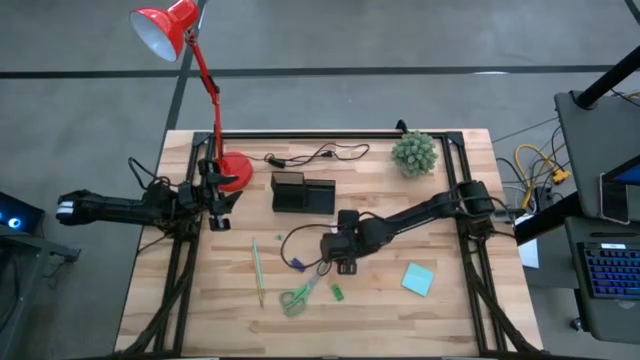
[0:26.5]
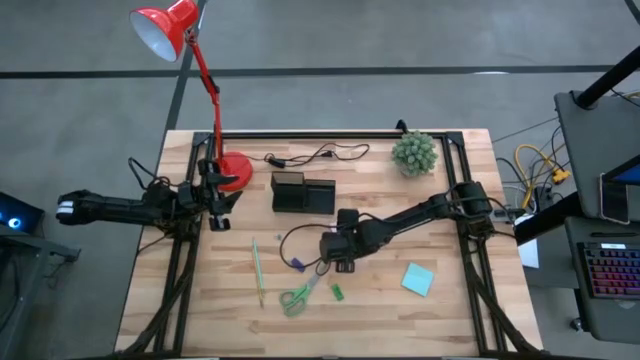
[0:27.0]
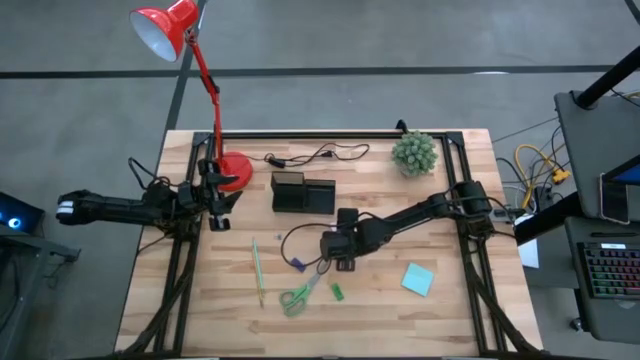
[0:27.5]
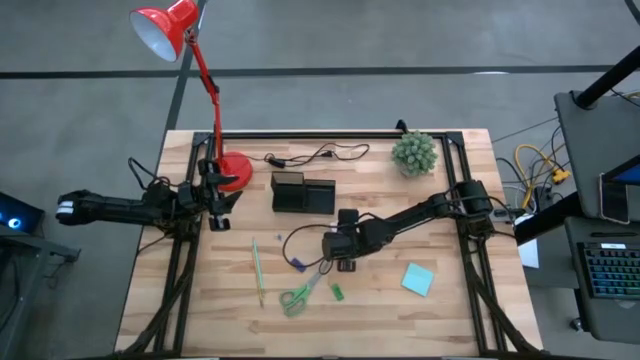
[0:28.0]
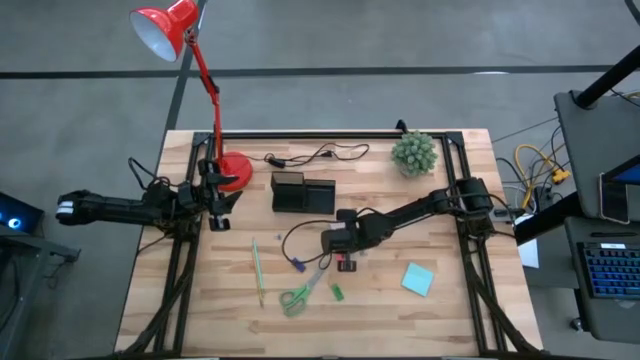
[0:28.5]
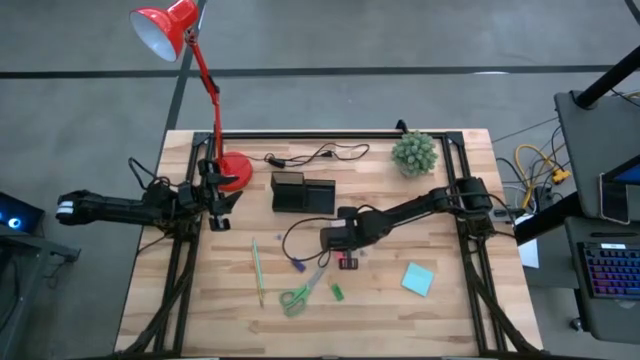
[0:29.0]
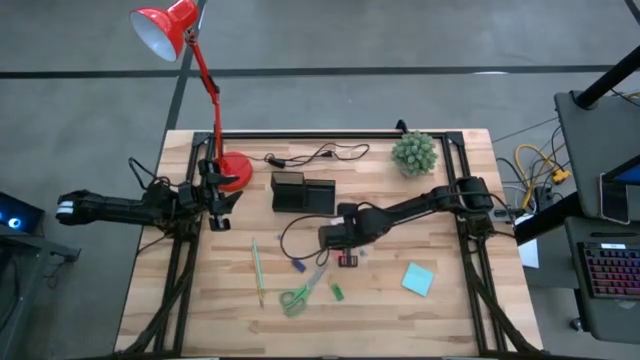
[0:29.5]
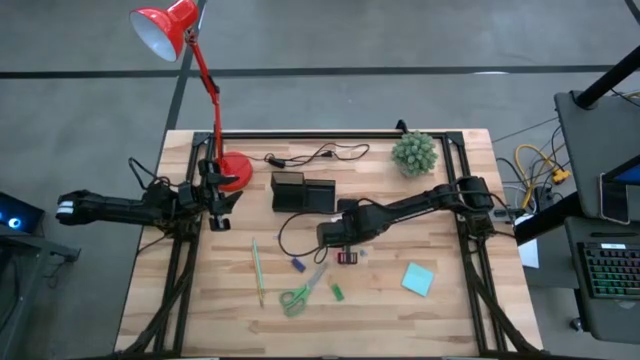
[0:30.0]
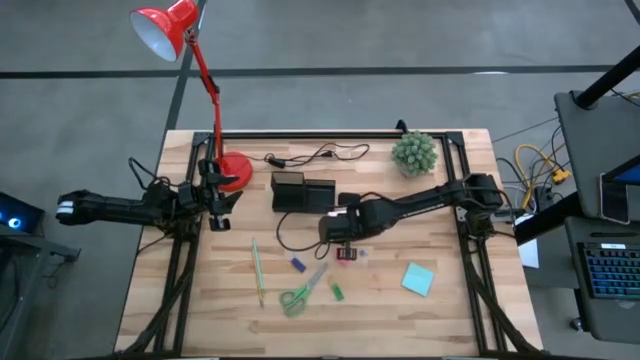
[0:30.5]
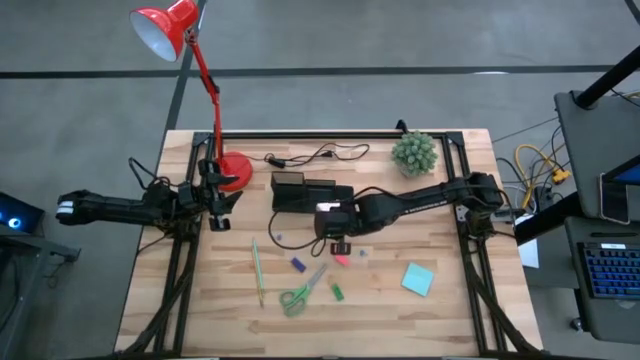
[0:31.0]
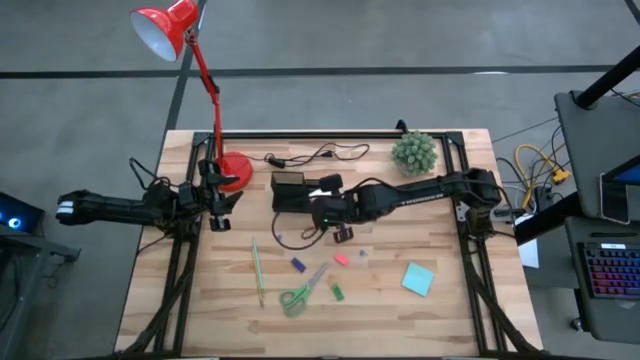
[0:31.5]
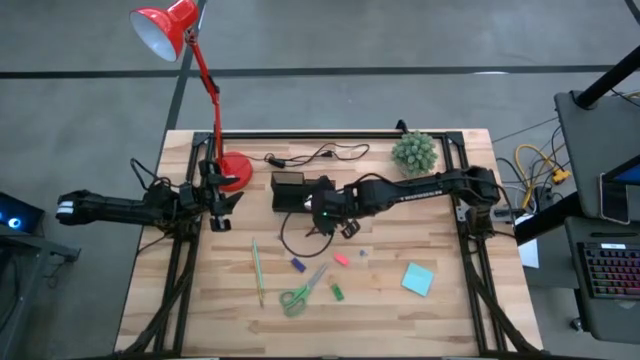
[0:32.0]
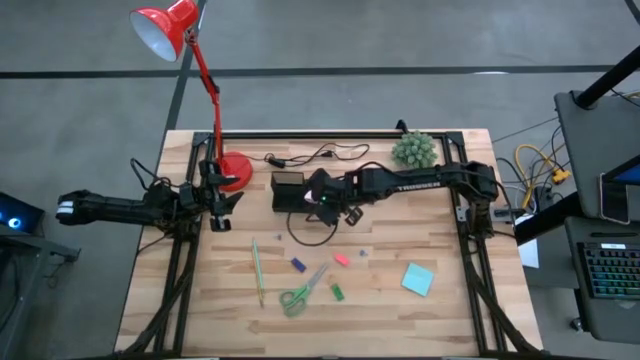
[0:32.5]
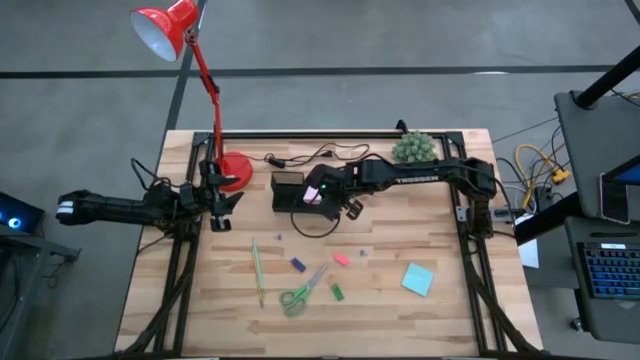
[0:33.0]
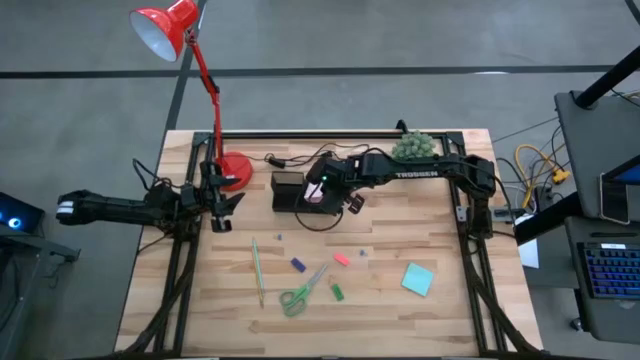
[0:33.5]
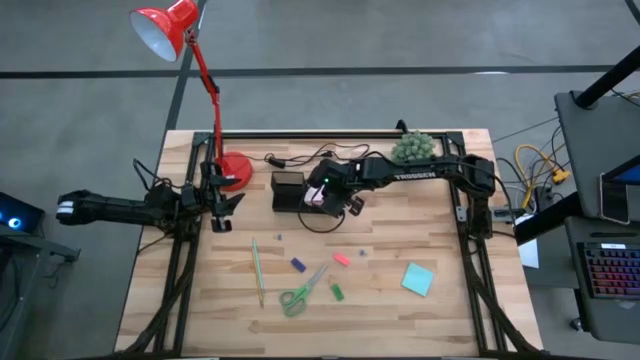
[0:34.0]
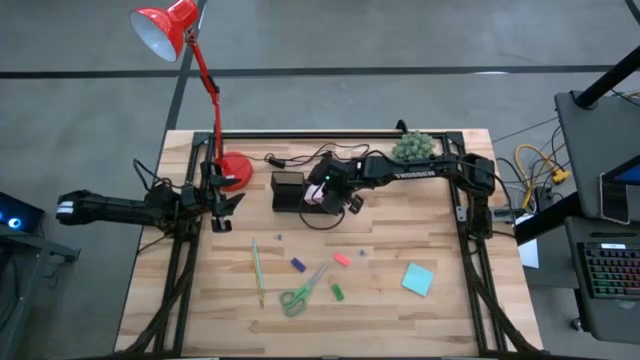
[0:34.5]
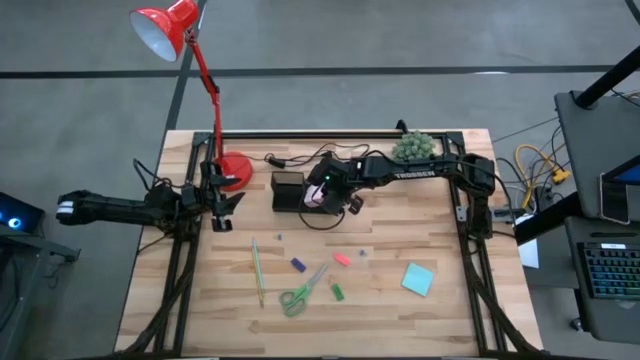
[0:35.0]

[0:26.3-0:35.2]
Task: Pick and place office supplies into organizer
Put the pink sticky notes into the black mesh desk organizer

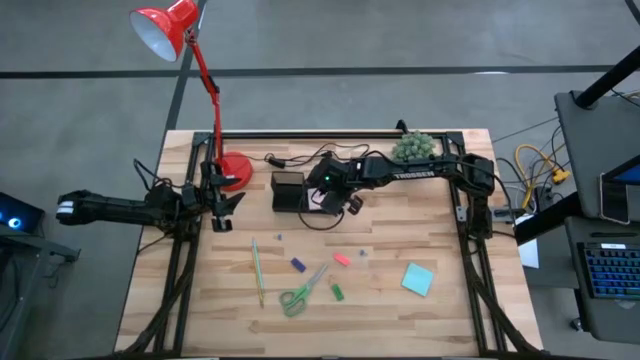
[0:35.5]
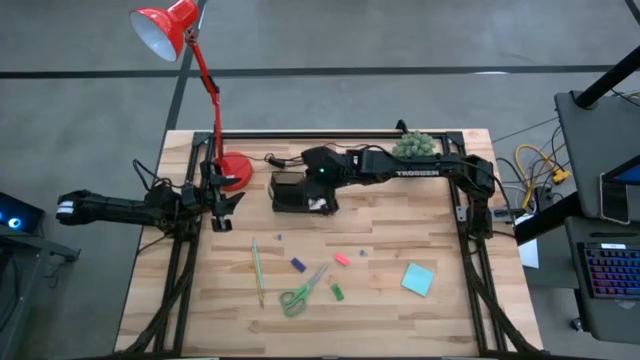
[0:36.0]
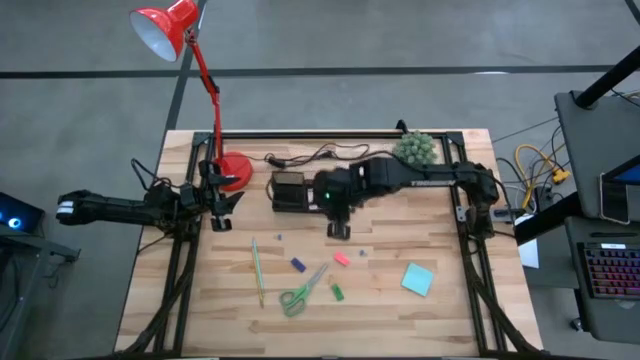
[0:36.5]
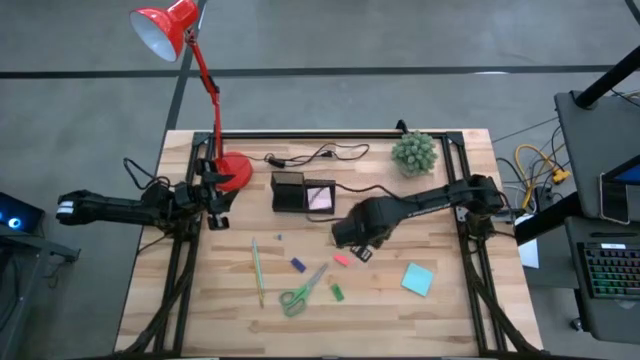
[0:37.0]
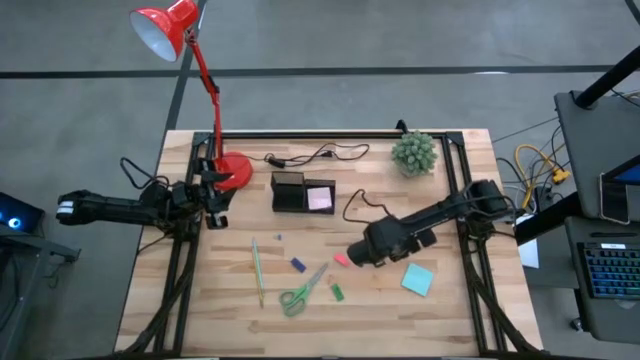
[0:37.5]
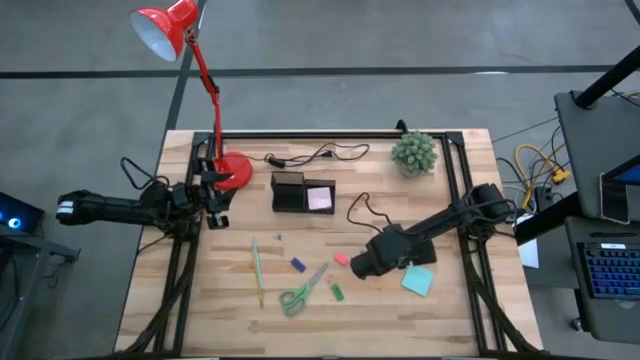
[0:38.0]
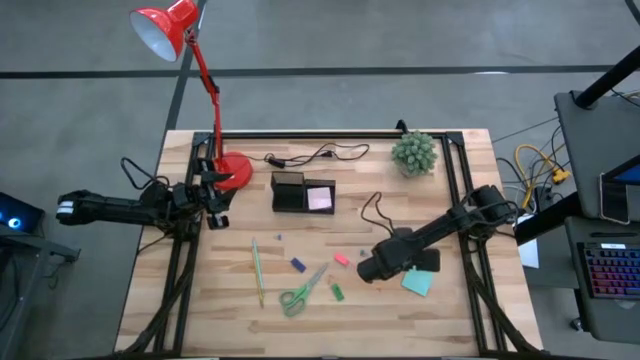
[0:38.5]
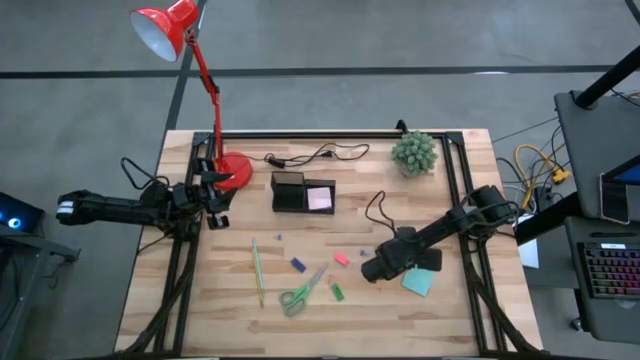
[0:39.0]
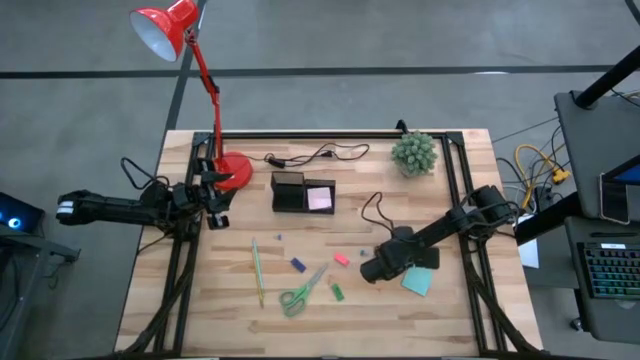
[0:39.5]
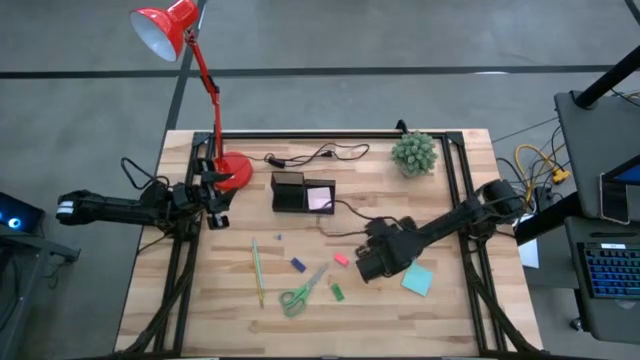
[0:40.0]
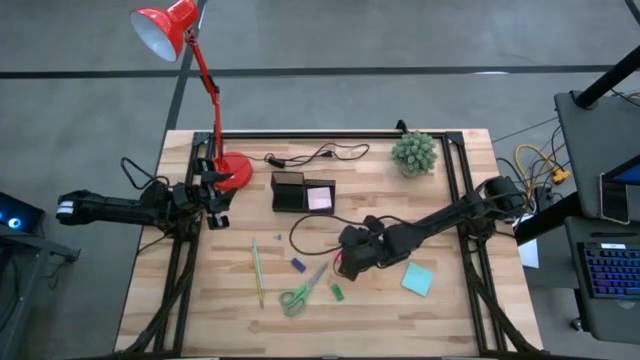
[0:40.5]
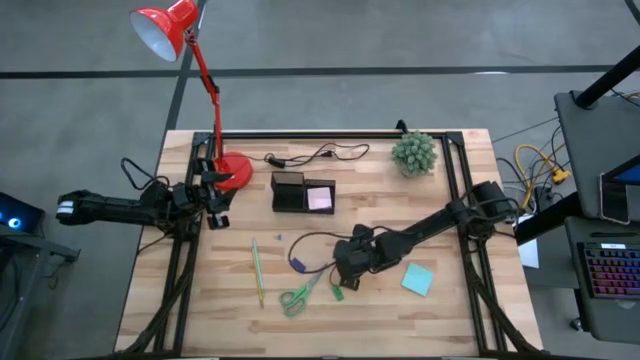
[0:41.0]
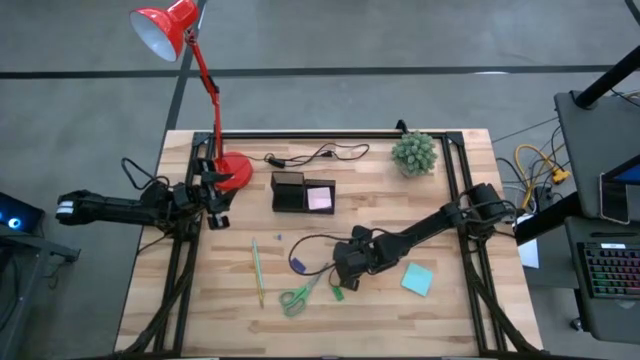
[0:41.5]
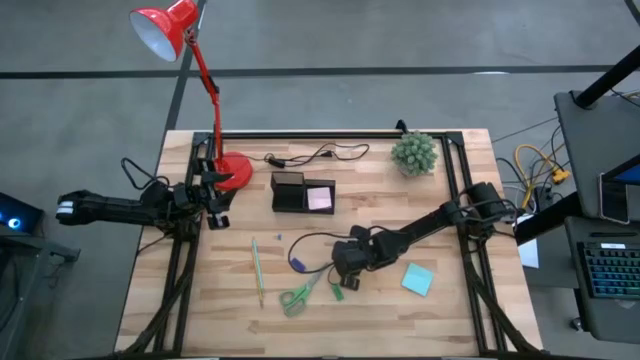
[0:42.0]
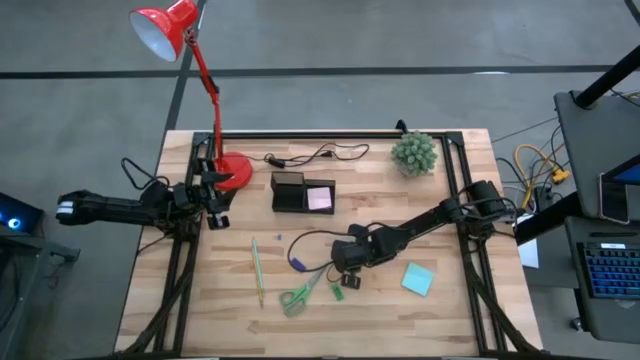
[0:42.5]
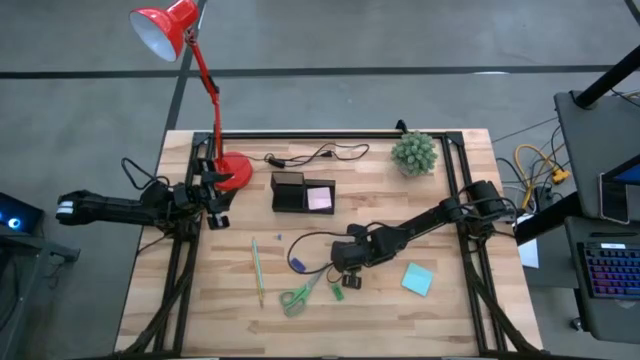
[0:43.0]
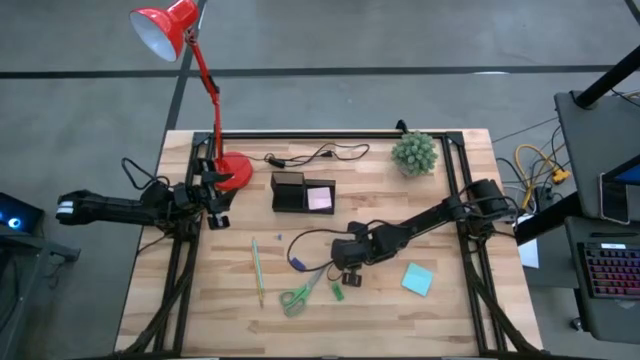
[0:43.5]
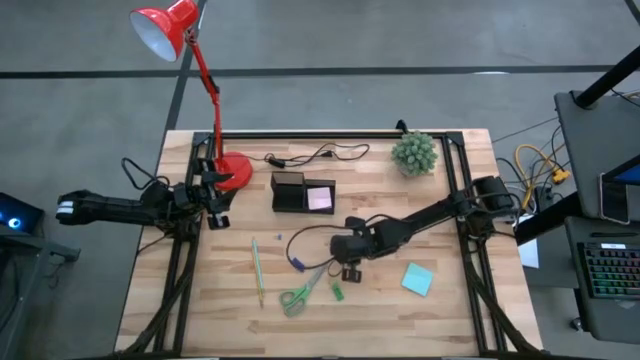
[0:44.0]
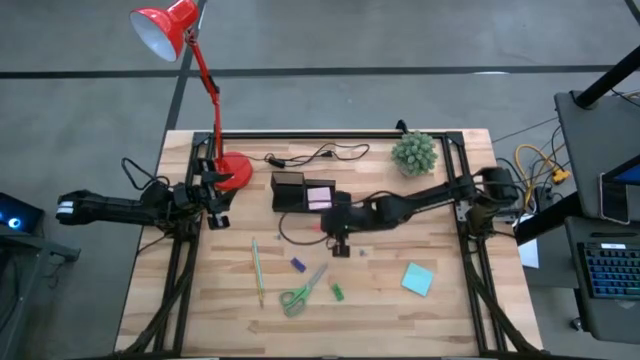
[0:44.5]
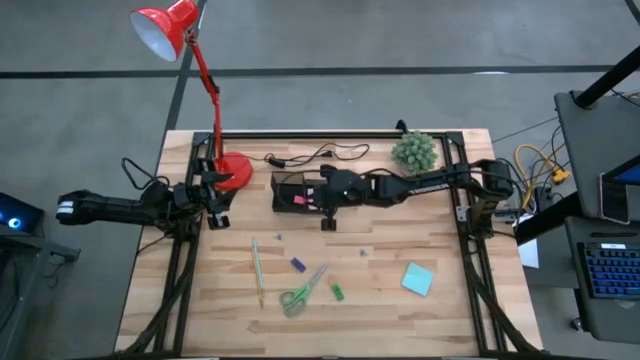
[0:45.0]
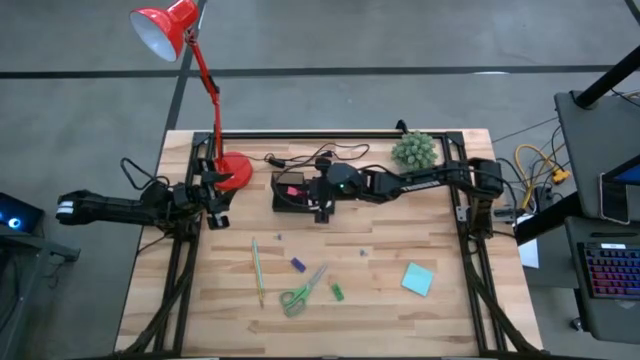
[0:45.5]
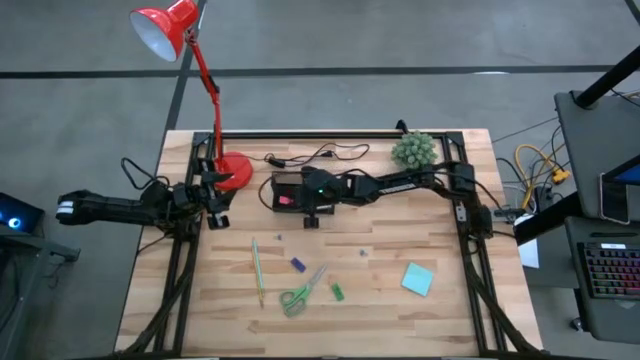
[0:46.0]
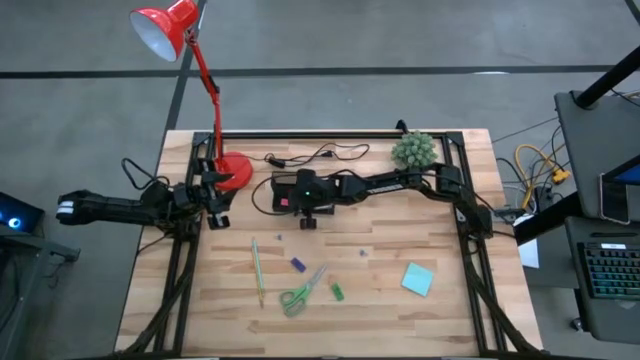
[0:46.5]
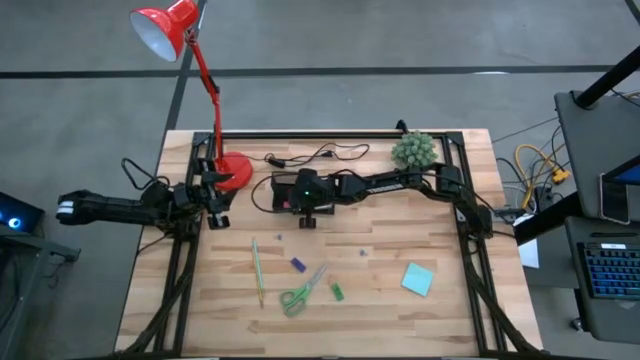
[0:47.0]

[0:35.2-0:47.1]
Put the pink eraser into the black mesh desk organizer
